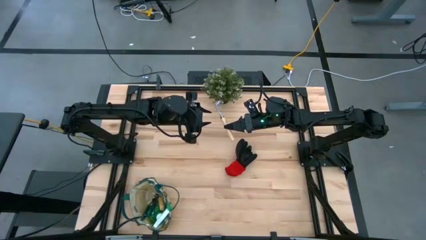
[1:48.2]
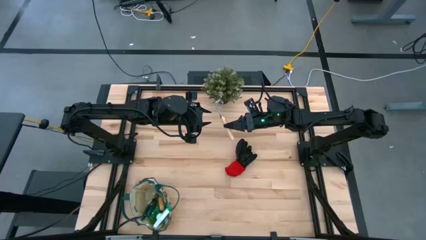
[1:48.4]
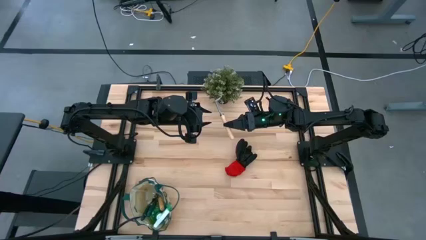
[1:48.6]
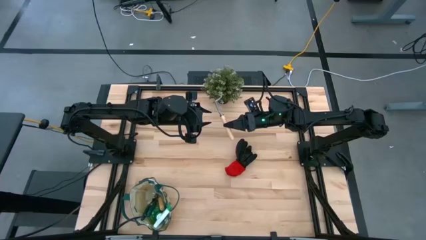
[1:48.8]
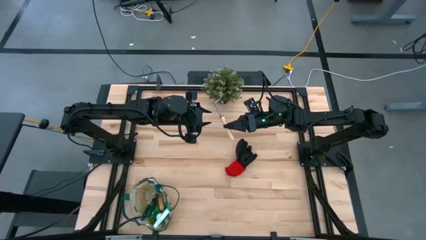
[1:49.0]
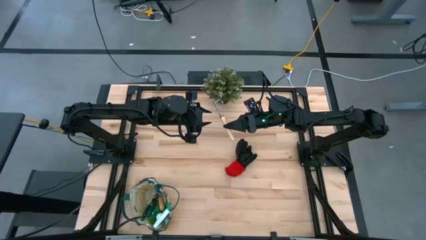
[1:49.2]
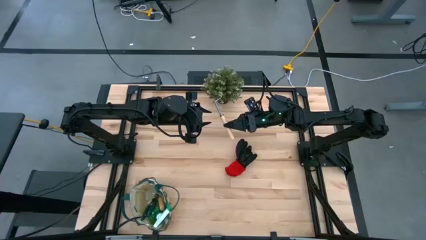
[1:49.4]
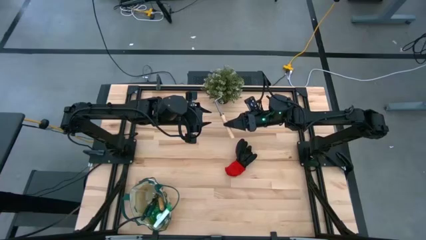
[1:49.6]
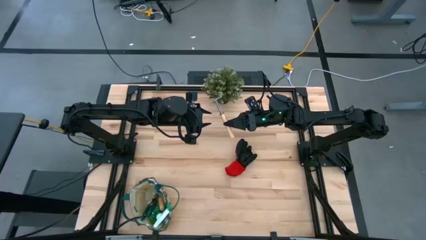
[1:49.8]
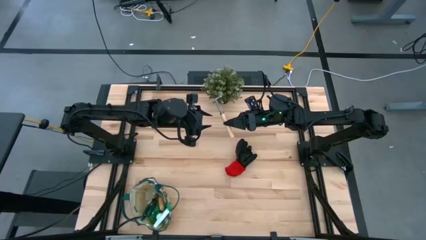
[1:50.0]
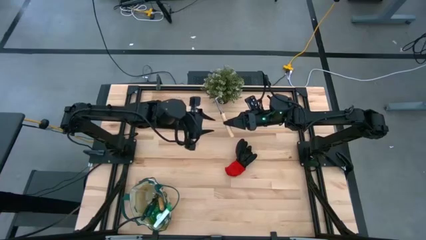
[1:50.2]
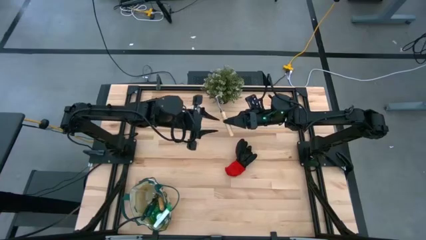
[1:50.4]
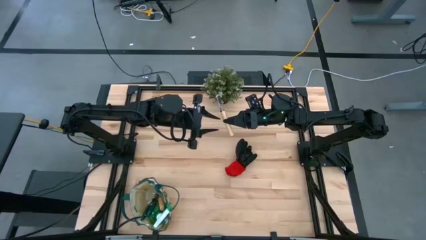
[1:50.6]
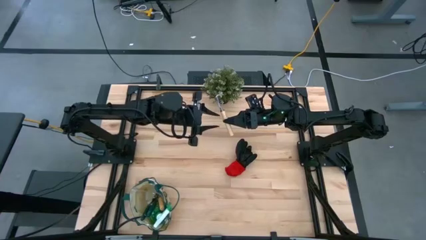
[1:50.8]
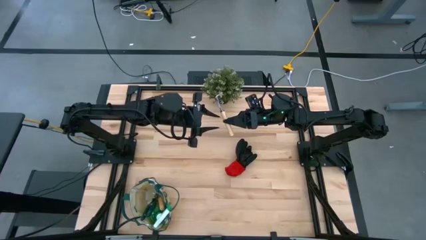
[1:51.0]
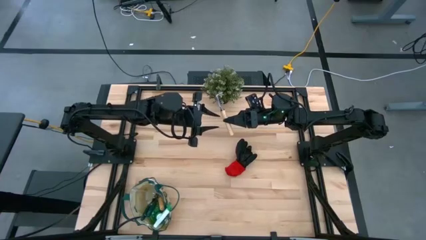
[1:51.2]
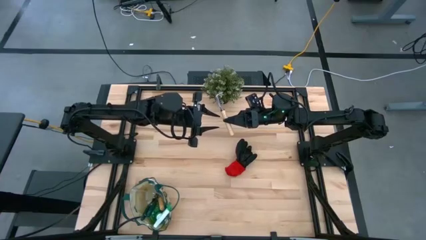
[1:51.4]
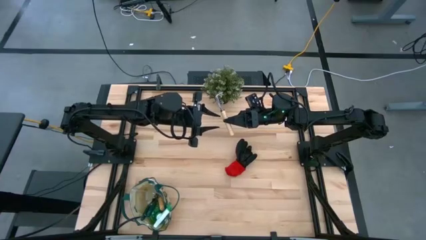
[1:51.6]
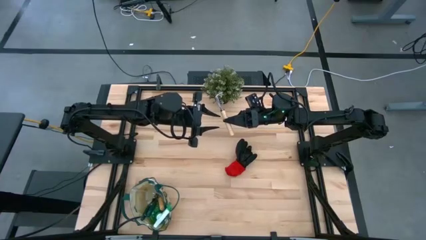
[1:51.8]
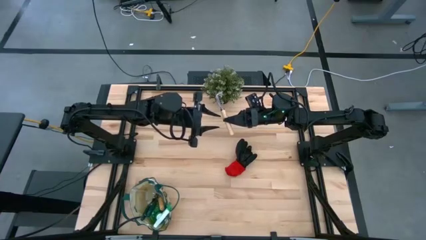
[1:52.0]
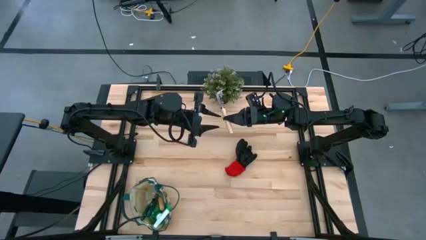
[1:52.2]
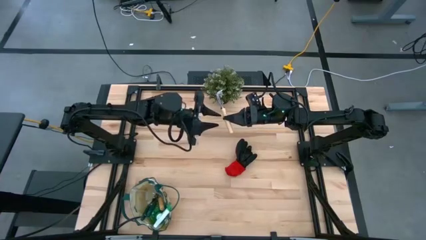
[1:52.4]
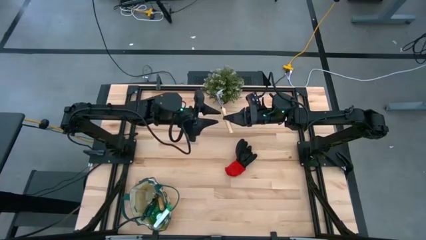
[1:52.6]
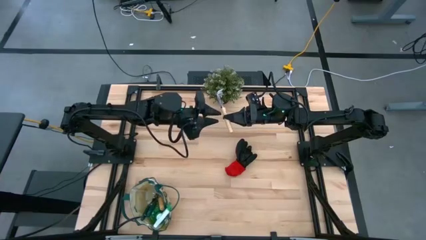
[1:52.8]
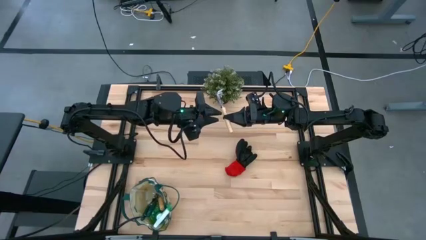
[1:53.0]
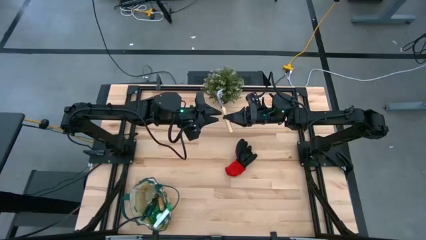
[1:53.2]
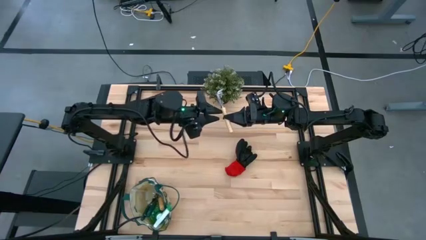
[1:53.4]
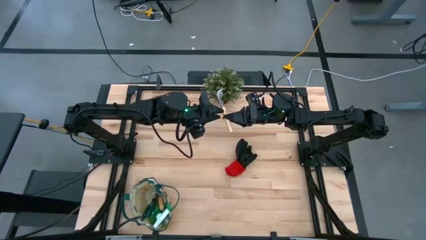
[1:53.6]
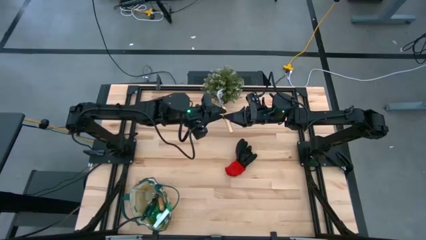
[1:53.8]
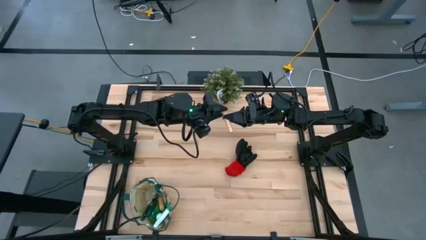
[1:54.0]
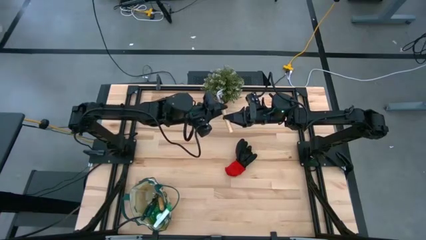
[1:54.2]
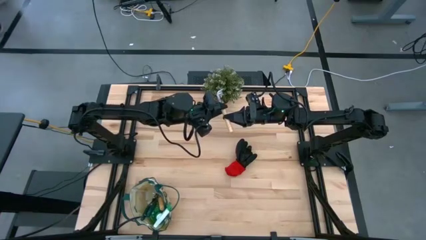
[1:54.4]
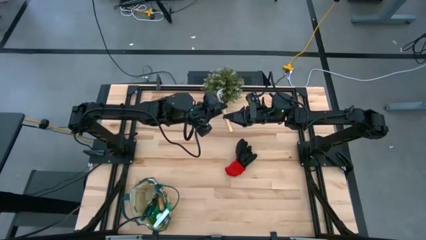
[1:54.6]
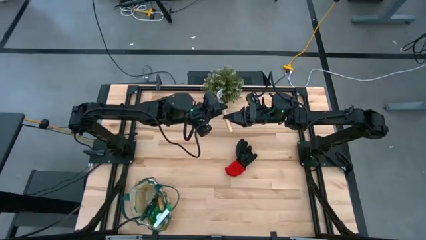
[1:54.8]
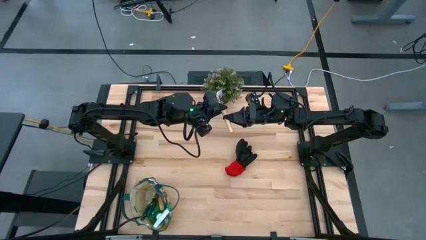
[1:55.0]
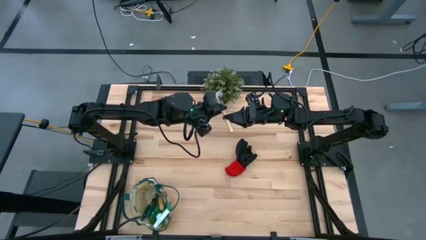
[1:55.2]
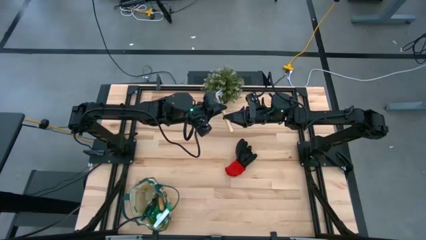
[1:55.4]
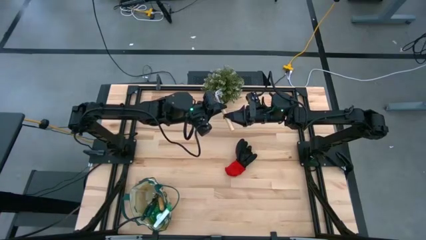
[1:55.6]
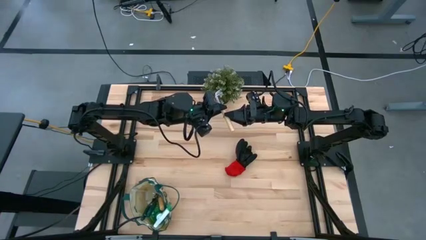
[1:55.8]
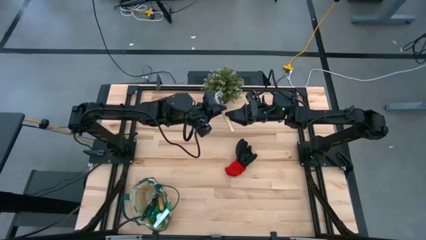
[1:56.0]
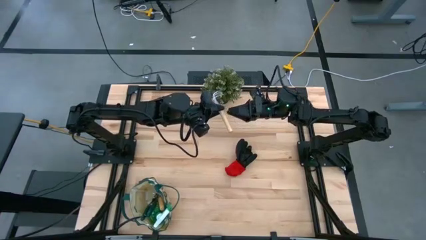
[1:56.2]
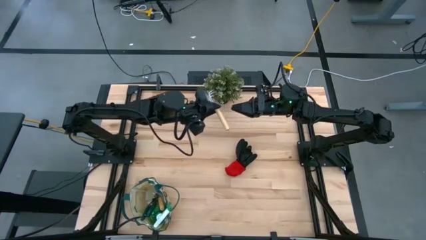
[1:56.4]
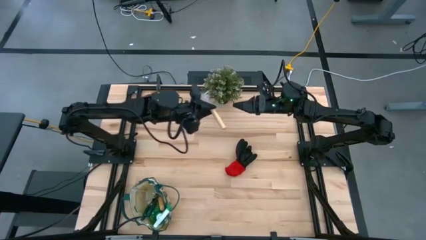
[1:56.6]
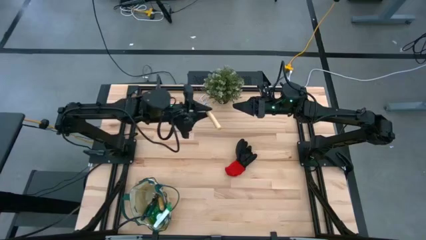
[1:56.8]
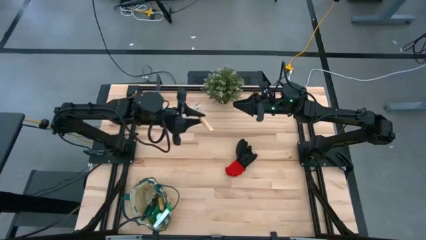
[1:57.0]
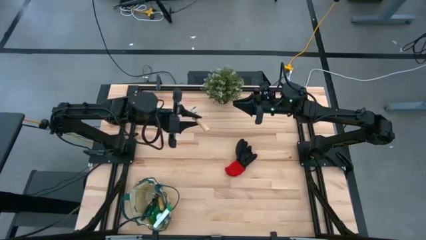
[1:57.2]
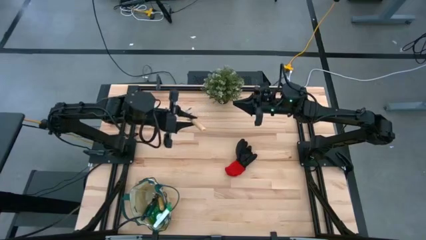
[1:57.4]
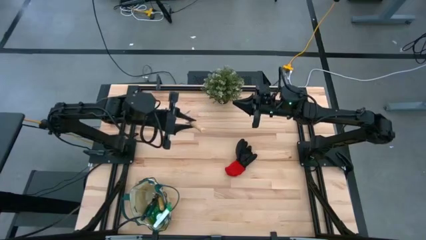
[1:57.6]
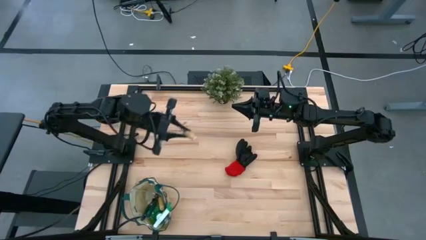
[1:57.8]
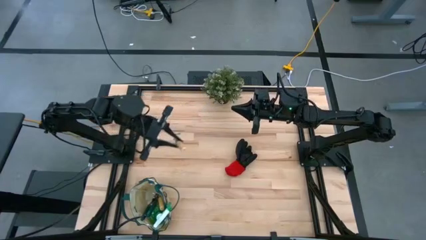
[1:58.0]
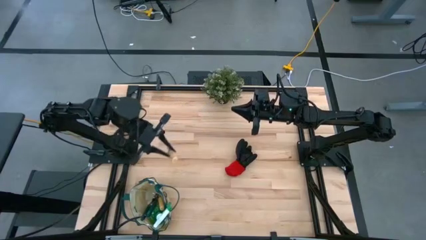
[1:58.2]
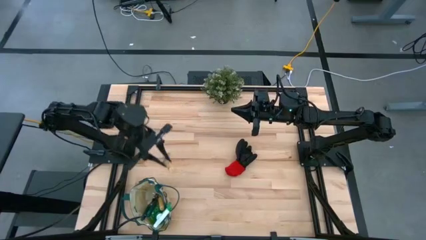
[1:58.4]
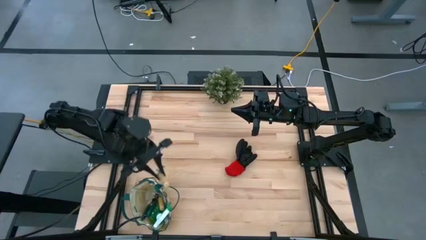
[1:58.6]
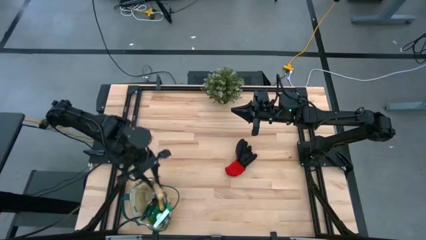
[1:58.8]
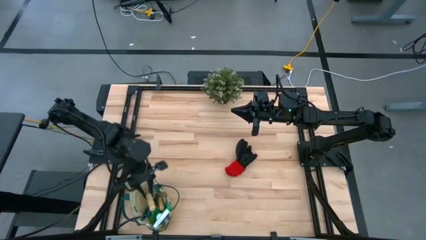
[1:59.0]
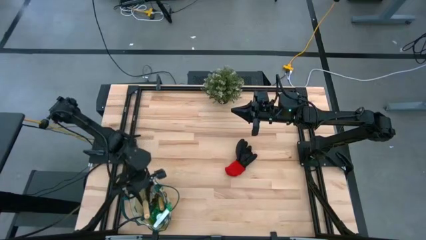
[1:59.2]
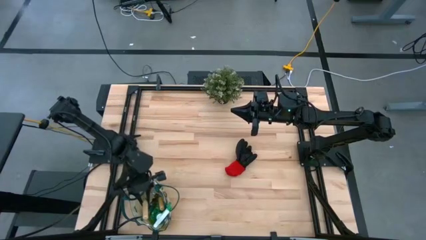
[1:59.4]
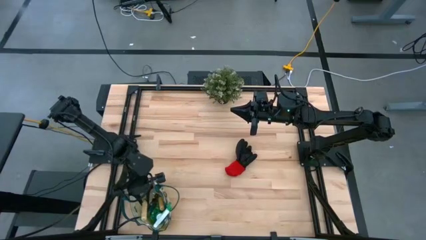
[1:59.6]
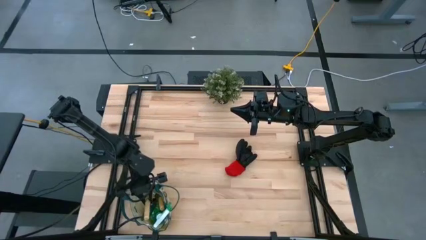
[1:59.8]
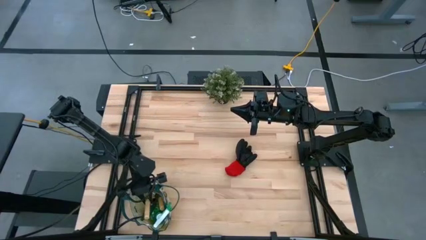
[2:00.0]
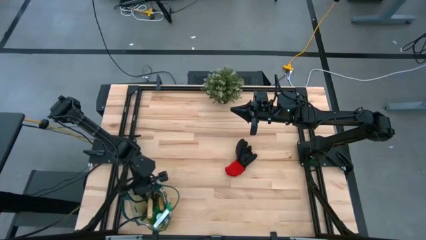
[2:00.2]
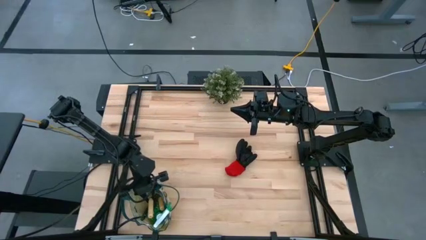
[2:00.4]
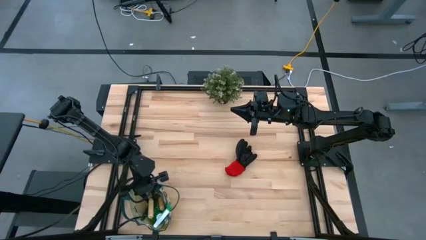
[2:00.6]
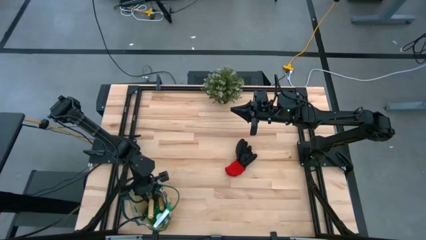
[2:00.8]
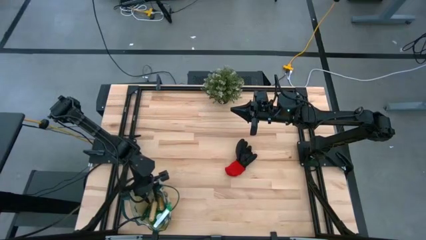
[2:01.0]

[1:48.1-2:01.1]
Task: Pick & Place Garden tools in Gardening bag
Put the brown hand rake into the gardening bag

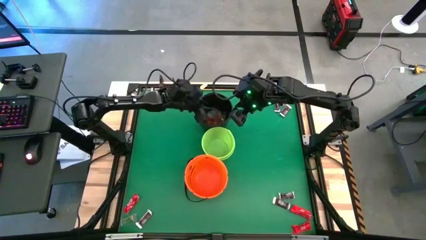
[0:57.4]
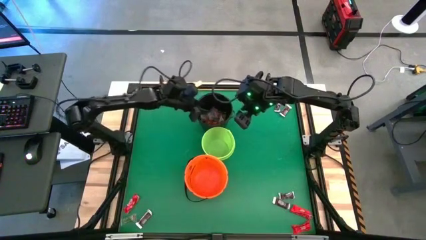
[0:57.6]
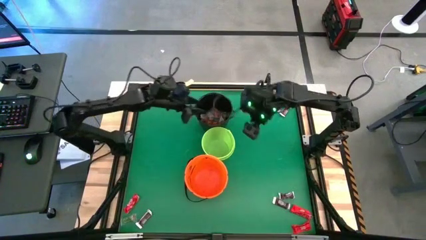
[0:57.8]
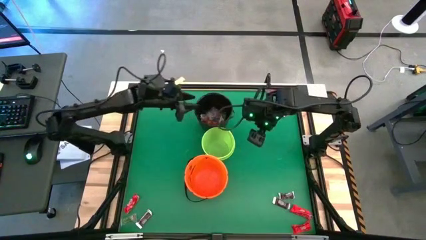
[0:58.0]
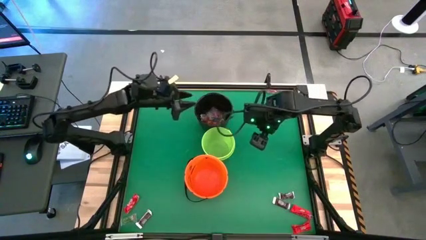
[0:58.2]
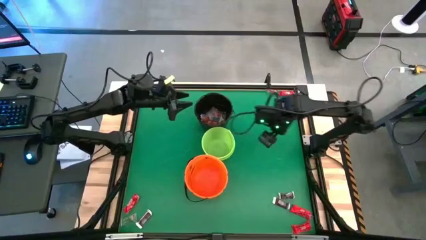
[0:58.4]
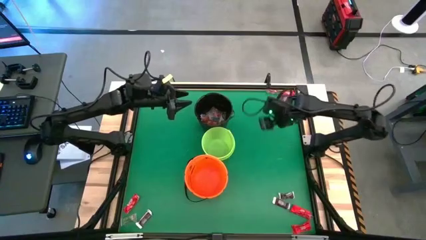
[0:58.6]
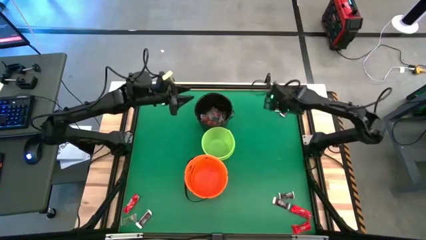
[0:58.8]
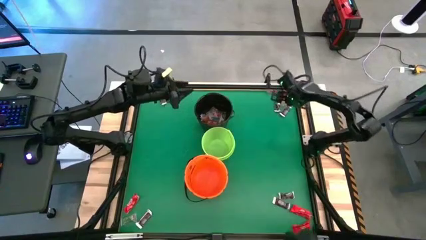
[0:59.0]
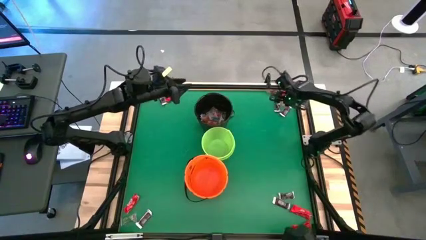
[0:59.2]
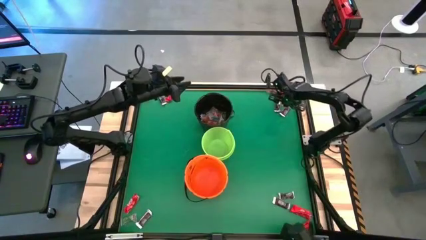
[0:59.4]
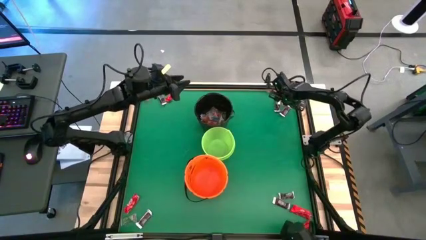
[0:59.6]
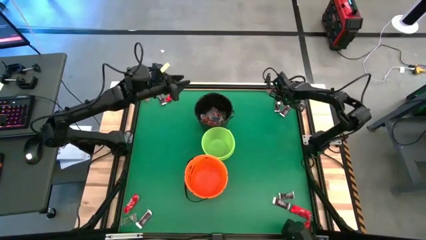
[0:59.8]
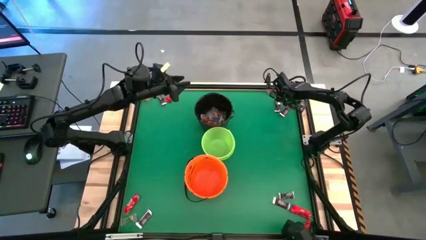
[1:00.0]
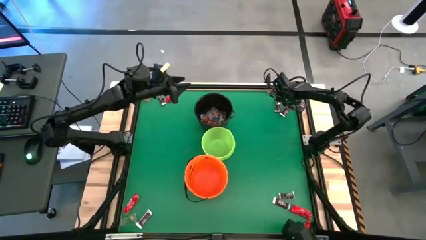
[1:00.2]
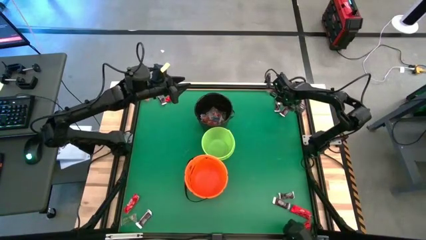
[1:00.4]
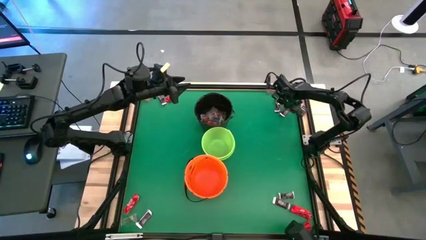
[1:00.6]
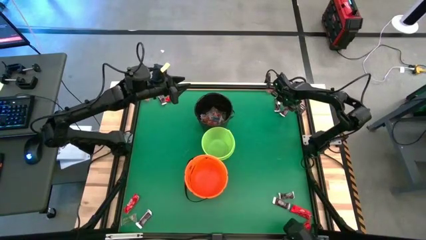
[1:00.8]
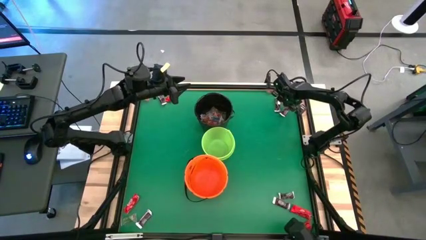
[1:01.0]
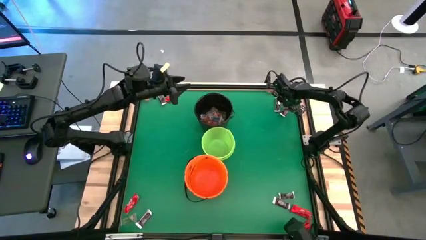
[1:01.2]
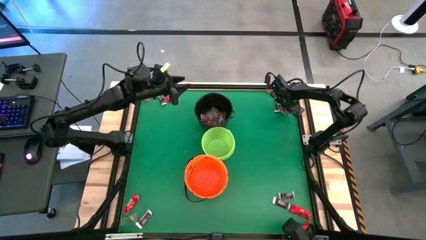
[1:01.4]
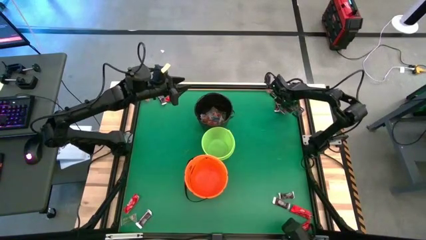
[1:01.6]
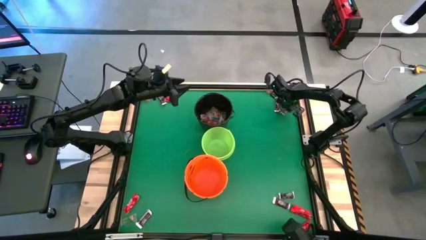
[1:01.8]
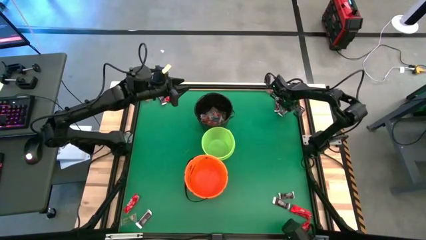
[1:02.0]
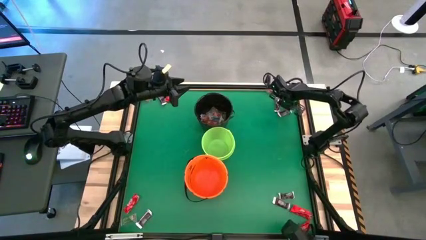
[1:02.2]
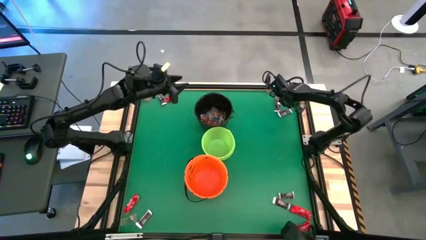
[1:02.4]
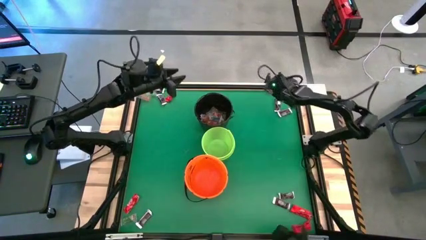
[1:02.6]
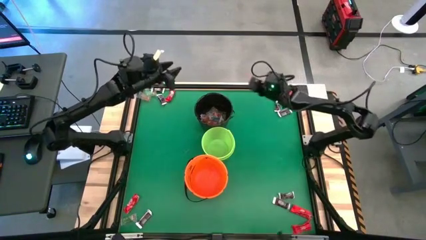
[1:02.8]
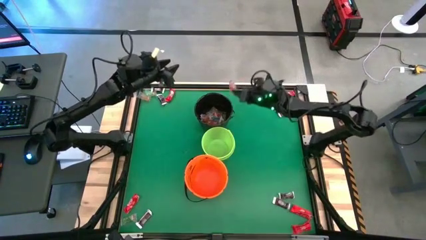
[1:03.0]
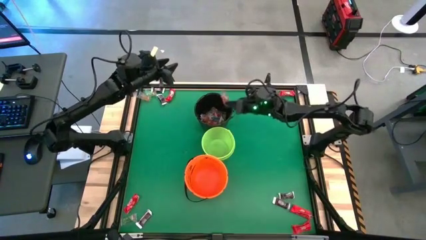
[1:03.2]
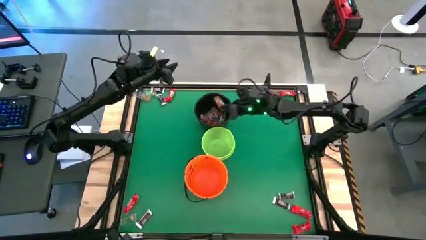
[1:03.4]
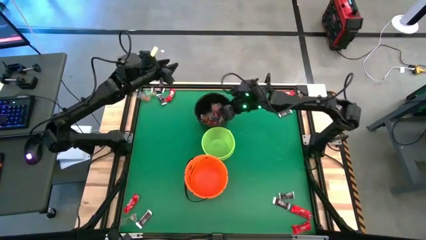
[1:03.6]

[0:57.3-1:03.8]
Task: Sort candy by brand, put in halloween buckets
Put the orange gummy into the black bucket
